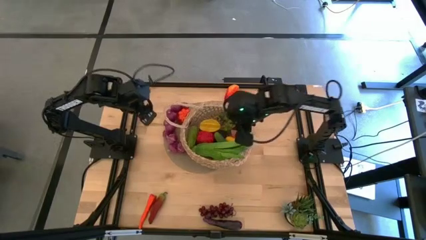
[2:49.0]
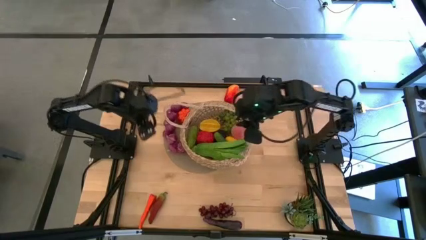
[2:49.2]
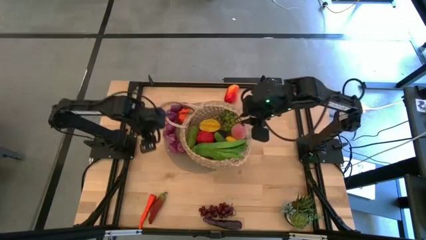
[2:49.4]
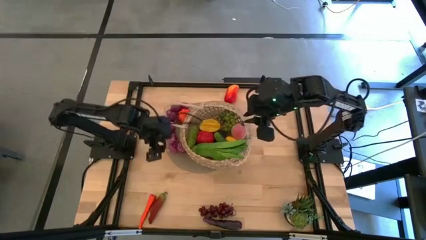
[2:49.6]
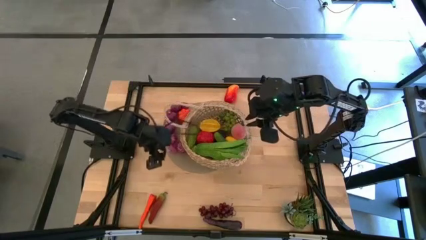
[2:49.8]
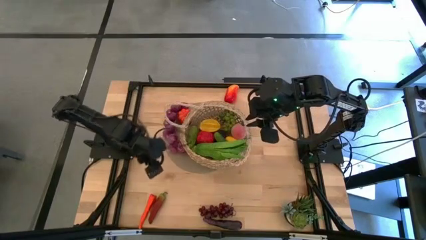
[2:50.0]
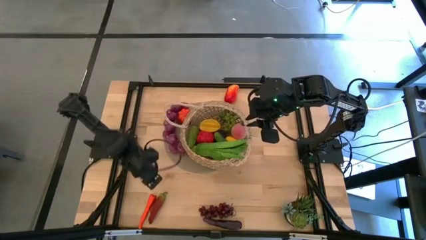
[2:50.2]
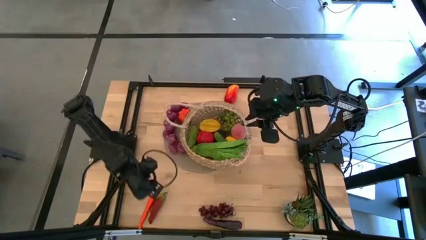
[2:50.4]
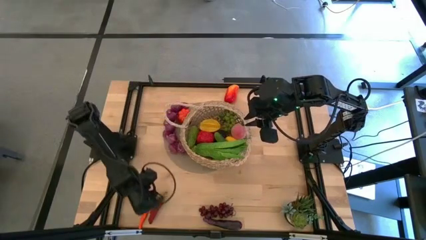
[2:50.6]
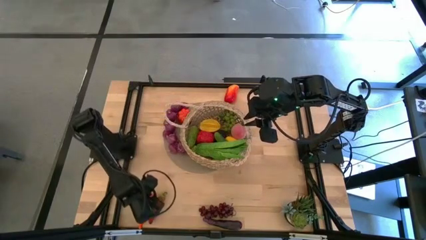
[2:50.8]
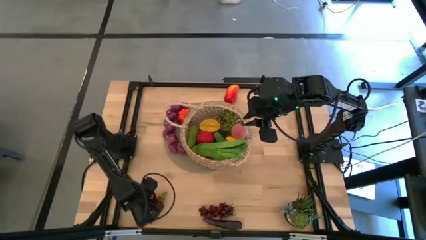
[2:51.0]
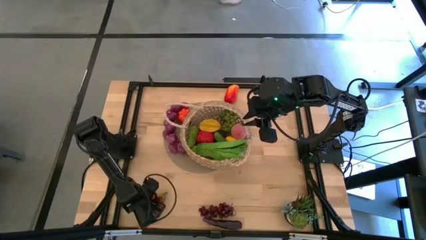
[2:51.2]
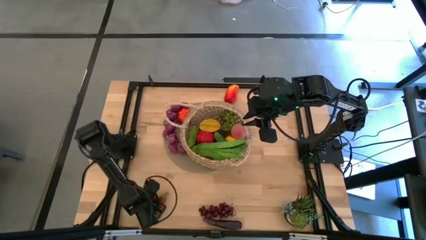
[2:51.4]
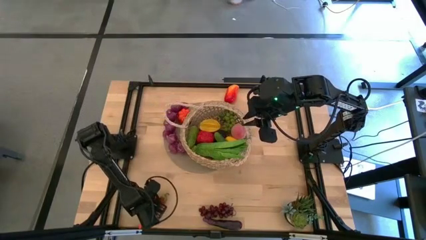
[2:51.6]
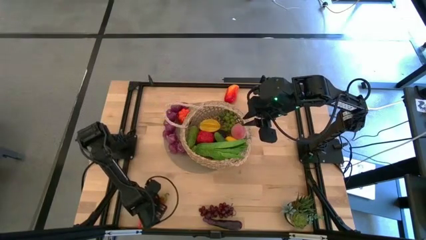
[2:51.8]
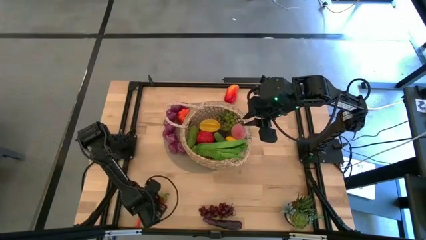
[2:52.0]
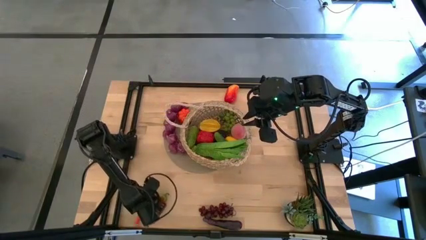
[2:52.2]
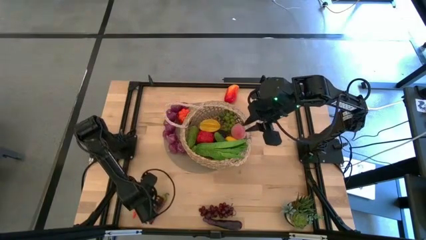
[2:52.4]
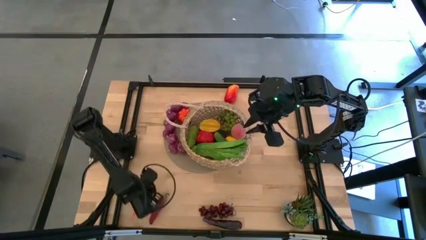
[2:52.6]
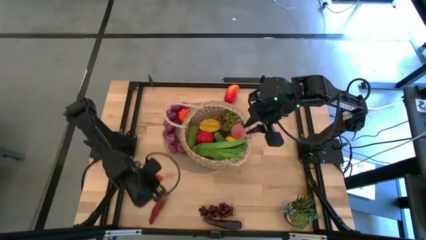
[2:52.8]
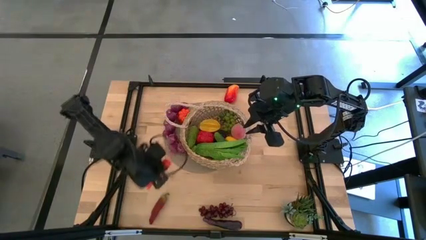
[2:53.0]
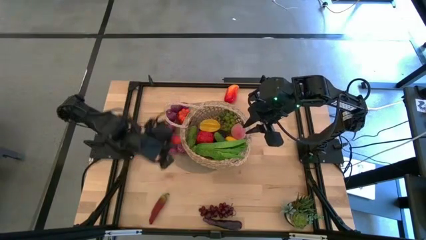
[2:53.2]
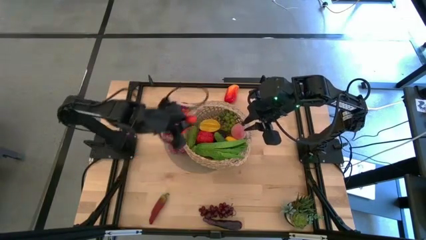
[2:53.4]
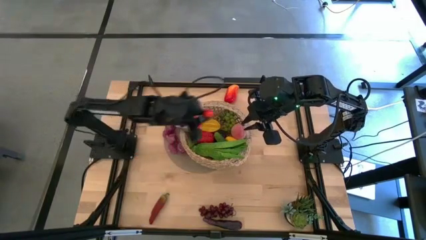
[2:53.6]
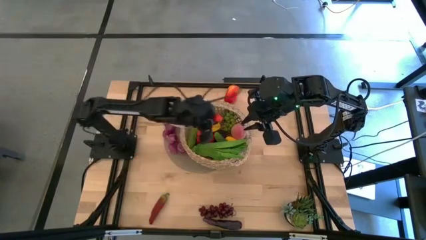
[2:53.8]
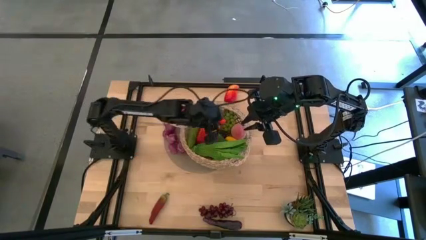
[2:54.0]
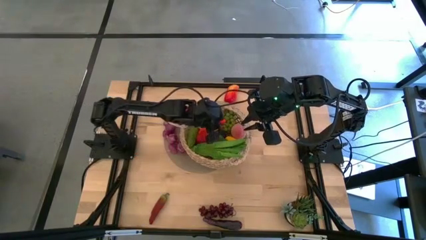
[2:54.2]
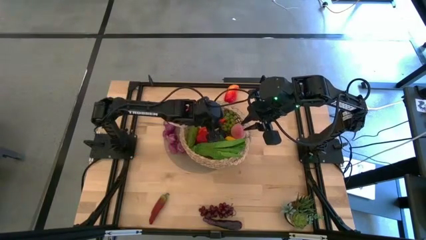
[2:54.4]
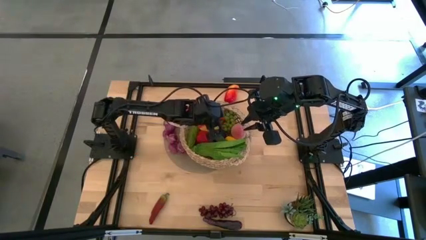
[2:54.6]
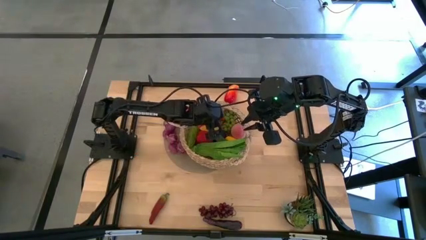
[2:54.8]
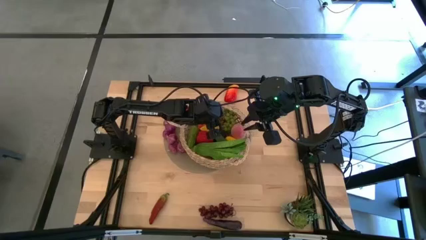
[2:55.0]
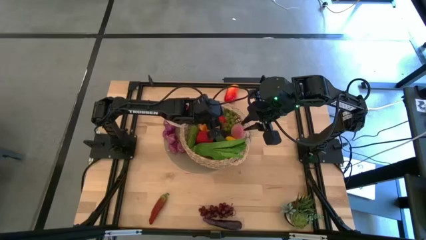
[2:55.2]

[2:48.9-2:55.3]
Task: Build produce basket
Put the orange carrot into the brown basket

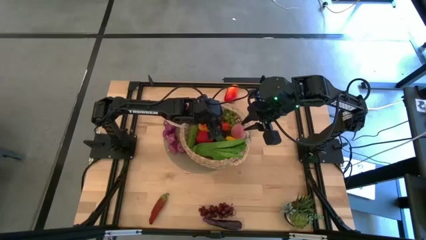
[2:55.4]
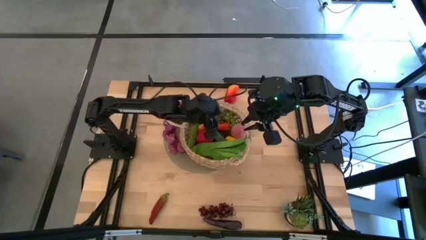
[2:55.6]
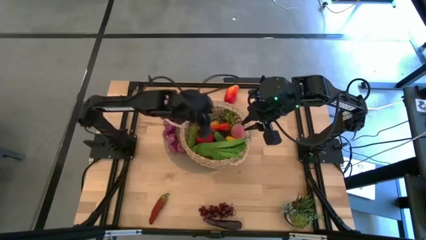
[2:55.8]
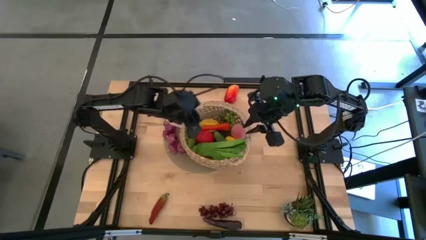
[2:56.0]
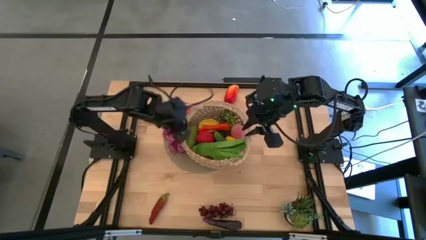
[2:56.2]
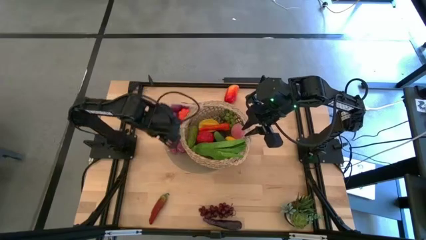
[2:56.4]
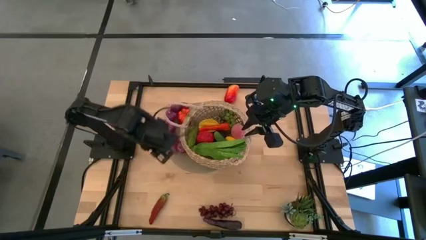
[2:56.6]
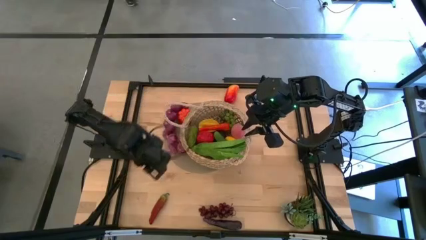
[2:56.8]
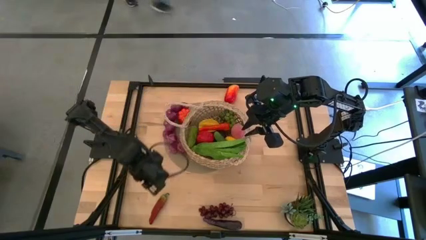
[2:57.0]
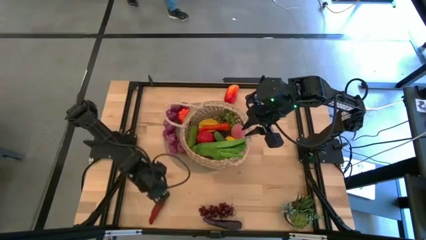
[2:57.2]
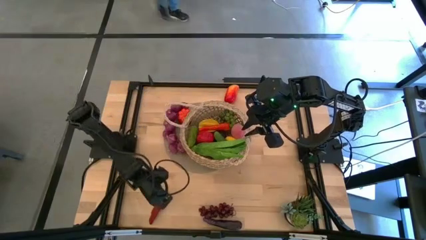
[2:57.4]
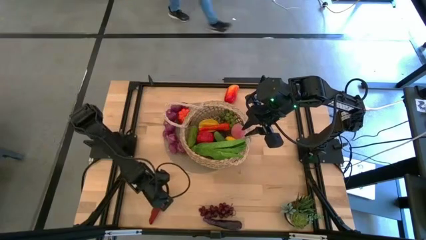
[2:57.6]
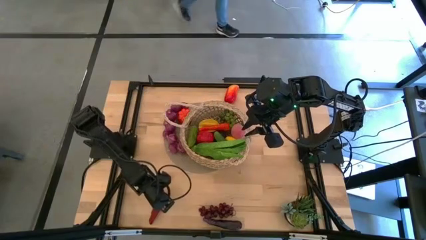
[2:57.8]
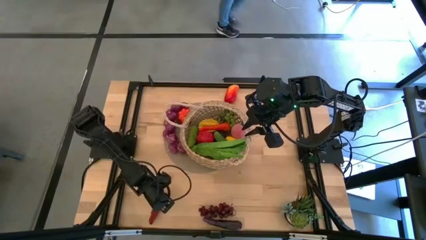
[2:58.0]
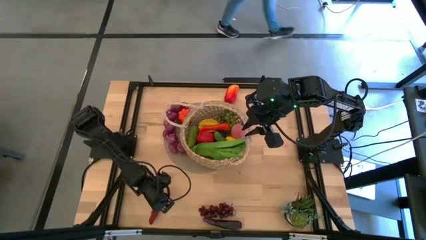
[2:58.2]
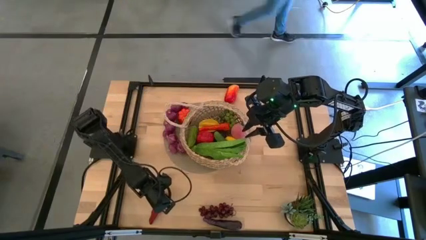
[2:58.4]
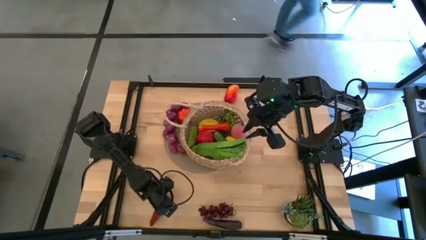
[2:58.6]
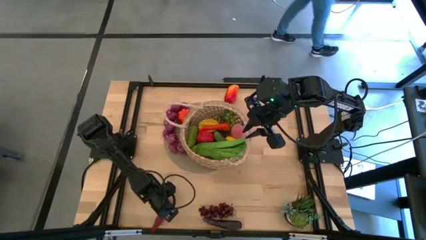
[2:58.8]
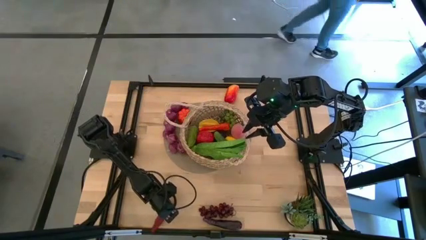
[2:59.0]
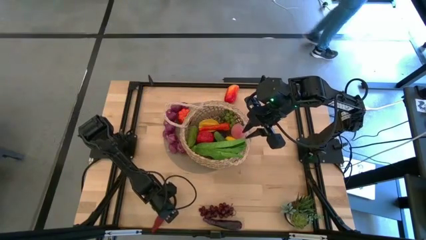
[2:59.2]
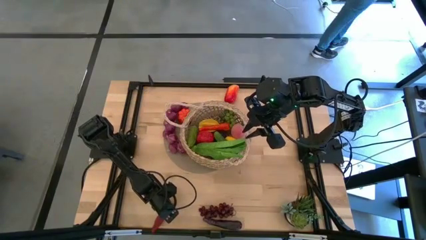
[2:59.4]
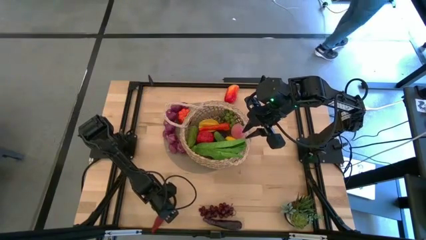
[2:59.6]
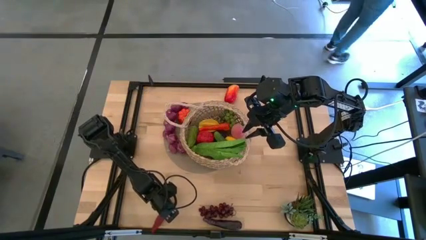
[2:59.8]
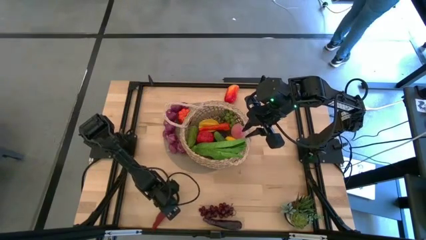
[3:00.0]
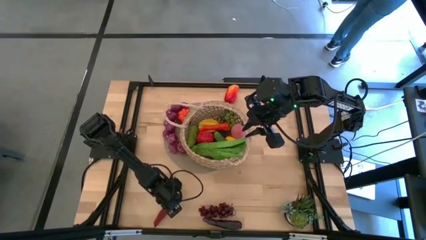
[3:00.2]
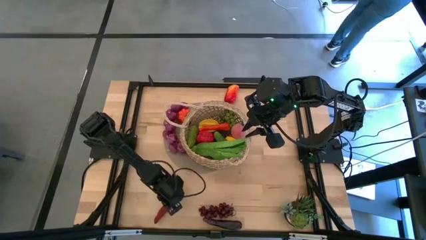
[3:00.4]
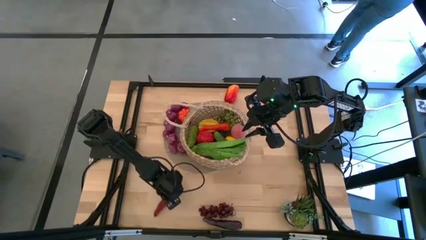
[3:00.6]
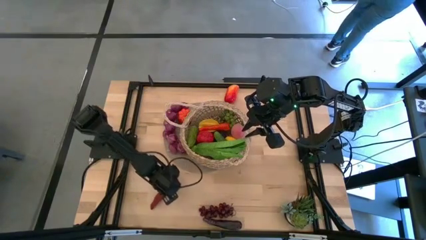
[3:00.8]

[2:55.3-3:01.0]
Put the red chili pepper into the brown basket

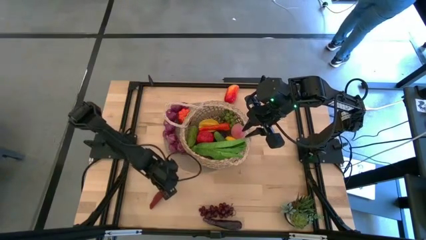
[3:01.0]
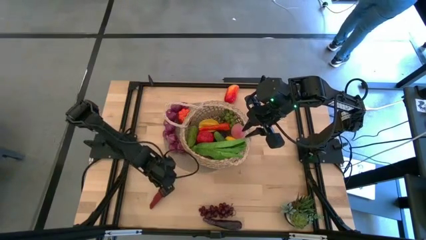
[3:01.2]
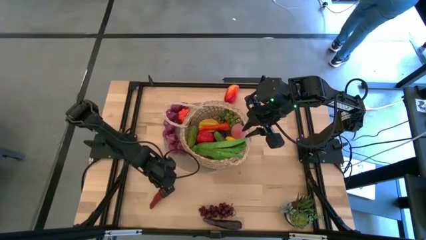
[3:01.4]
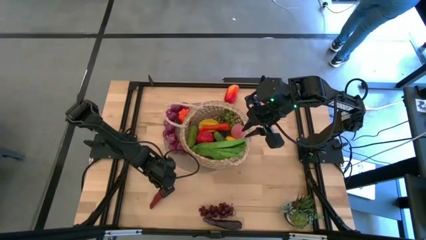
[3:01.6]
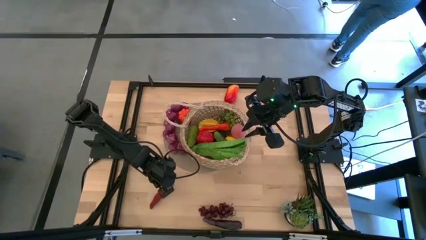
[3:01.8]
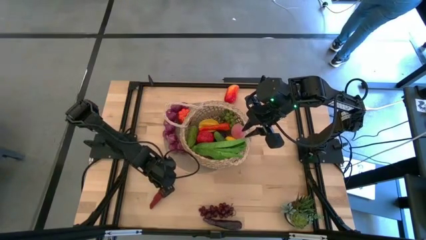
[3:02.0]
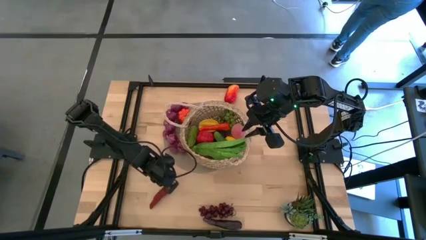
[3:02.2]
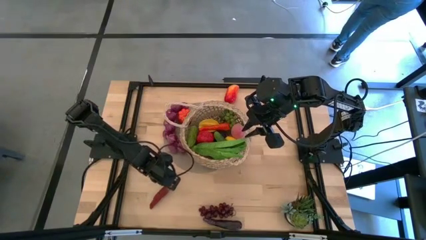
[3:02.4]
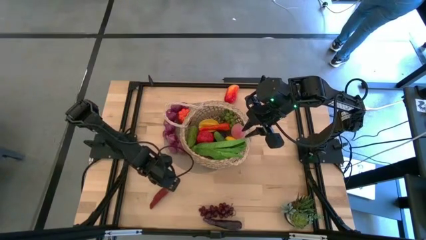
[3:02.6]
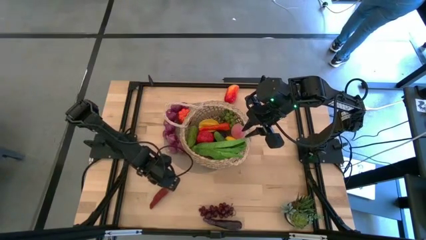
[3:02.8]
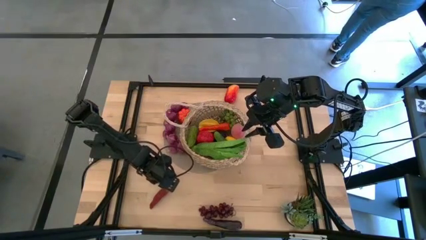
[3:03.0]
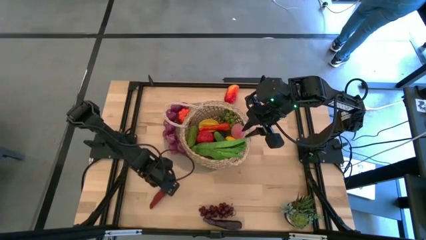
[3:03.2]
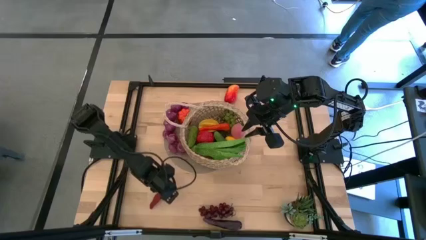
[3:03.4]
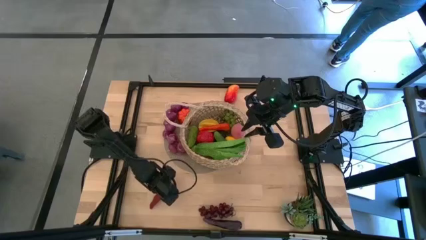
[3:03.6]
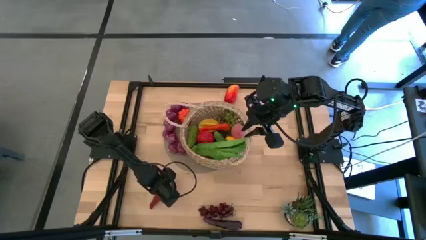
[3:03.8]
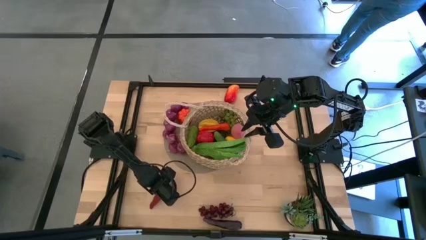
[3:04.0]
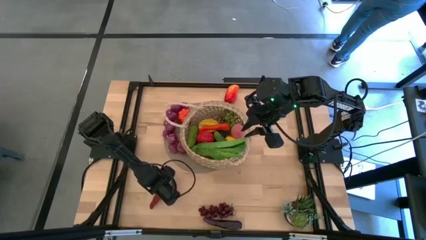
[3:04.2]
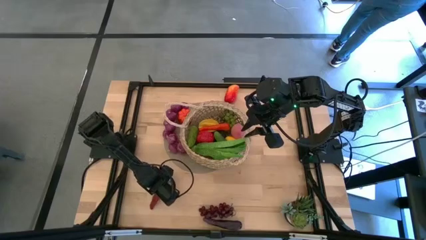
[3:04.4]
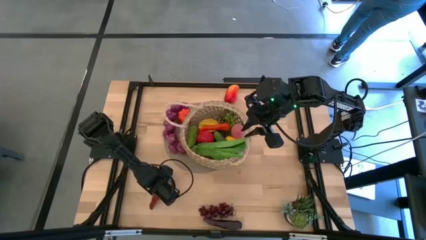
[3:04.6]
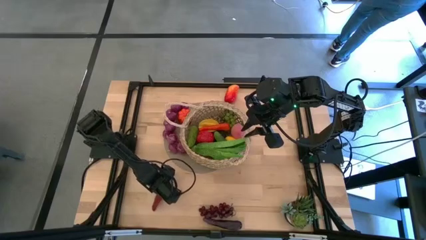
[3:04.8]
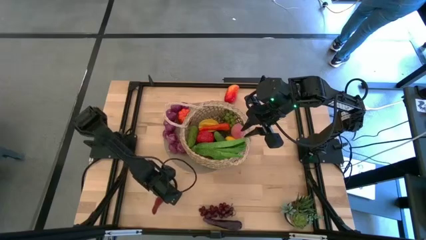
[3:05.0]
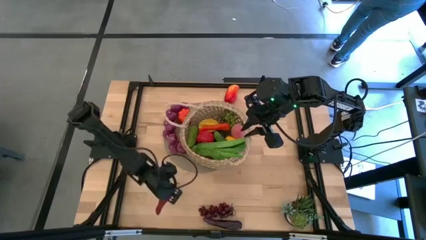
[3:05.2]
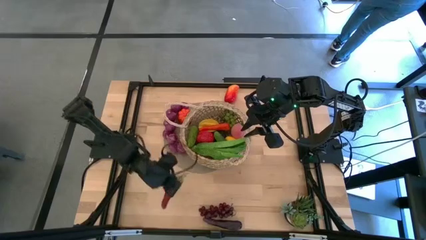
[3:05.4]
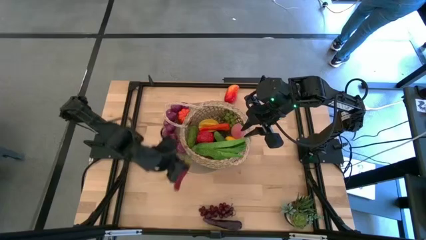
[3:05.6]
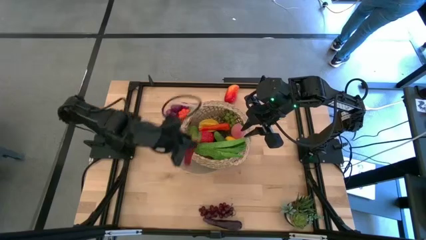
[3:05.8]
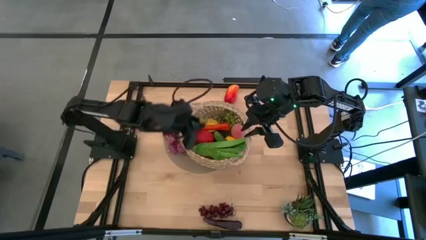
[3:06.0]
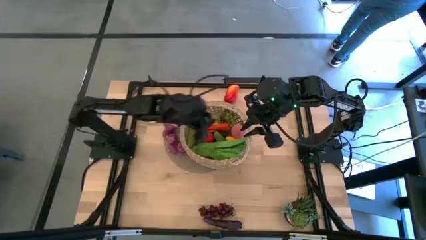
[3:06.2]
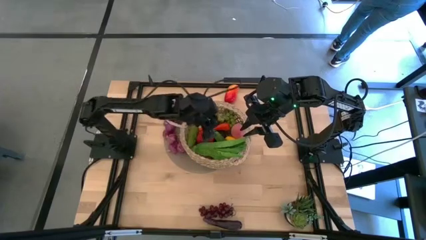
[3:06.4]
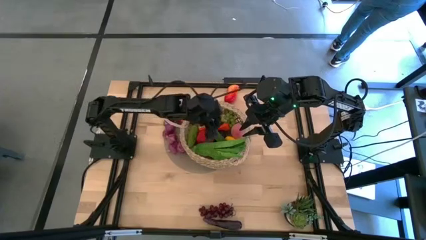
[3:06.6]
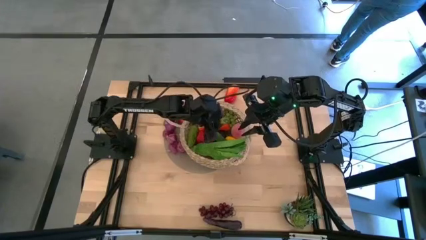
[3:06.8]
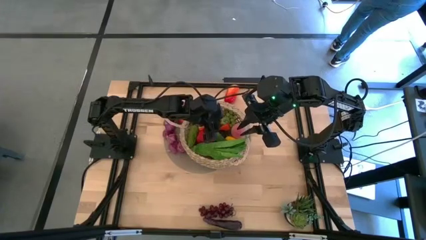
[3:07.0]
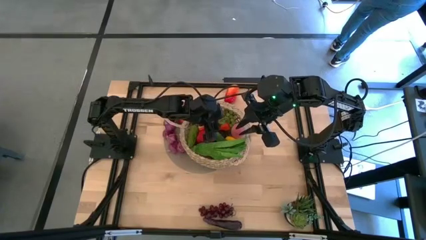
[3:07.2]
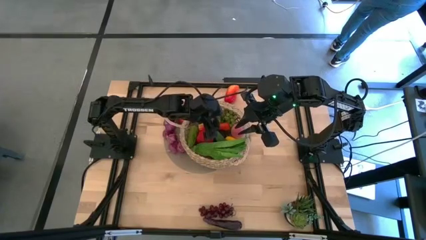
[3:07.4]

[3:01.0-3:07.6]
Put the red chili pepper into the brown basket
